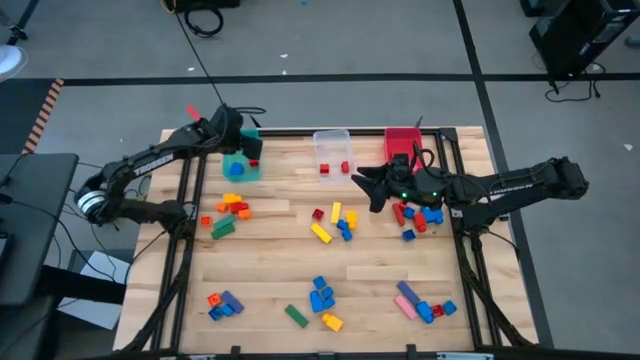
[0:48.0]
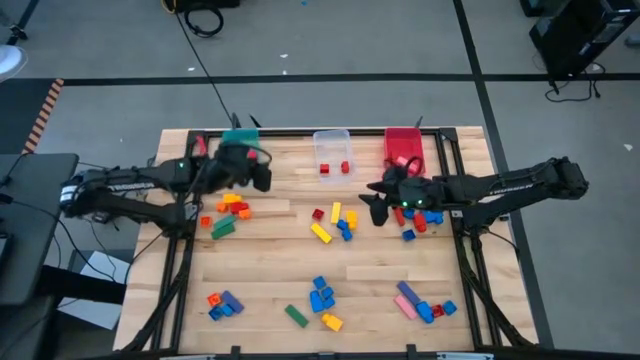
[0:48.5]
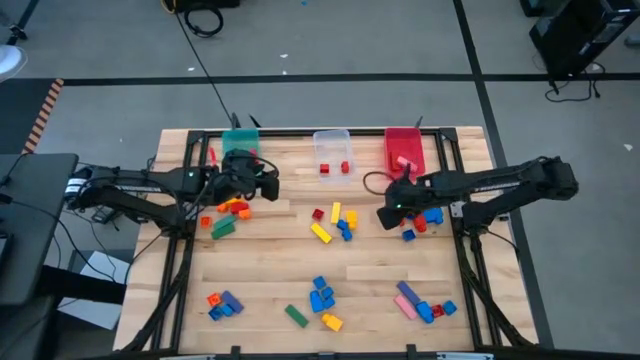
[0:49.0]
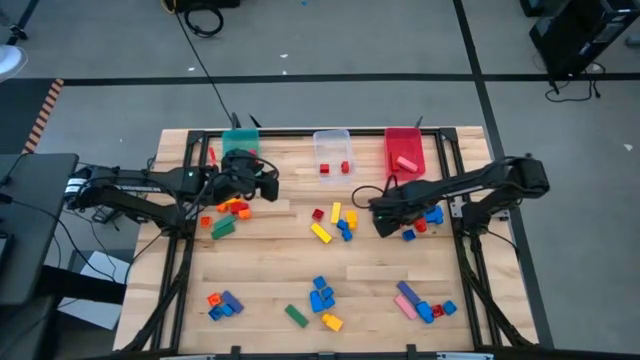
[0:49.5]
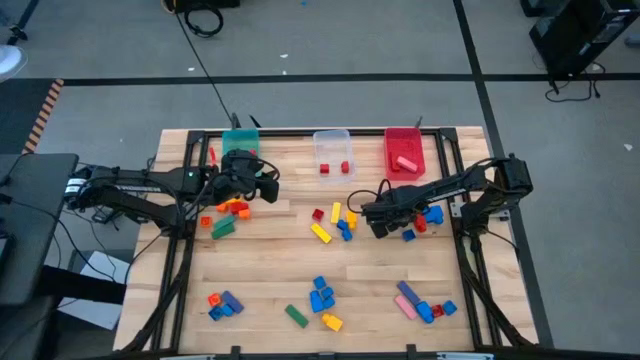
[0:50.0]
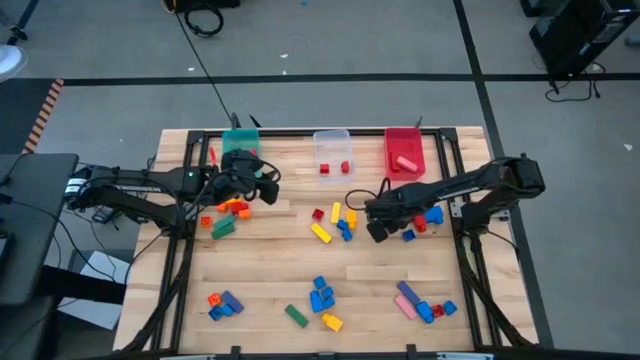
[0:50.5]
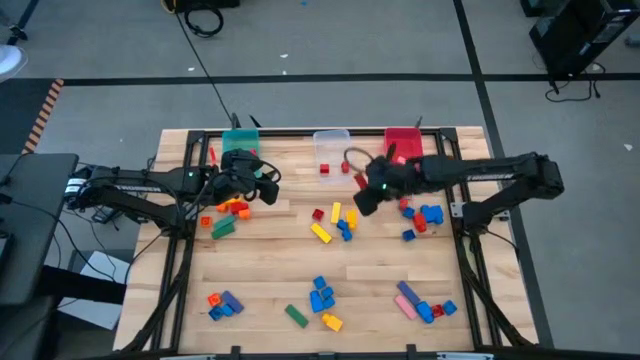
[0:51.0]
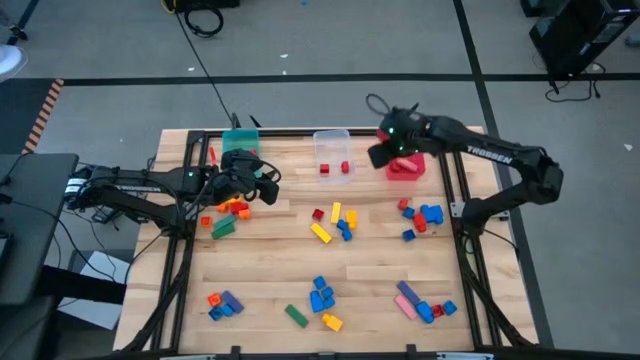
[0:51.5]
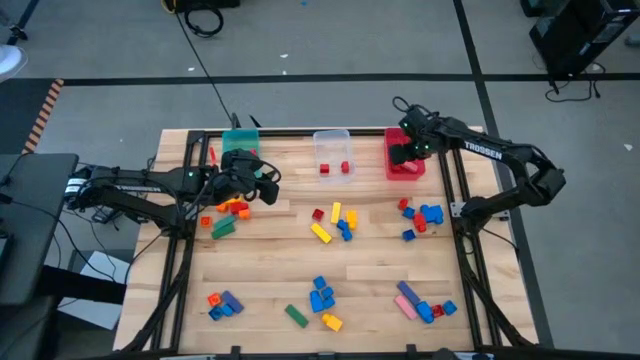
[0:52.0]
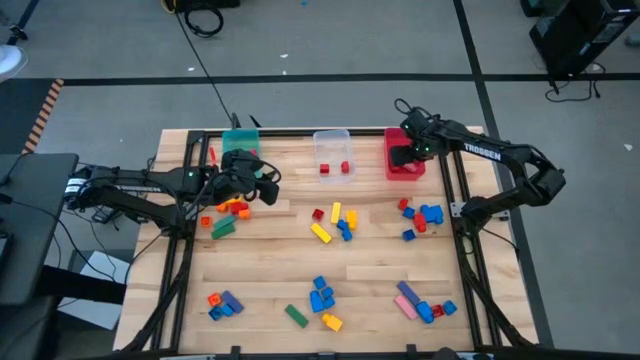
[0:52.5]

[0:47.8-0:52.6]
Task: Sort blocks by size
Put the red block into the red bin

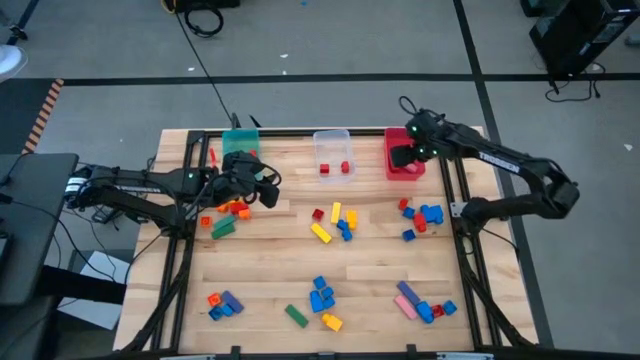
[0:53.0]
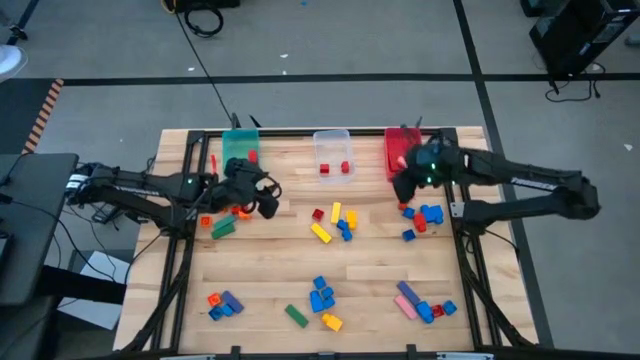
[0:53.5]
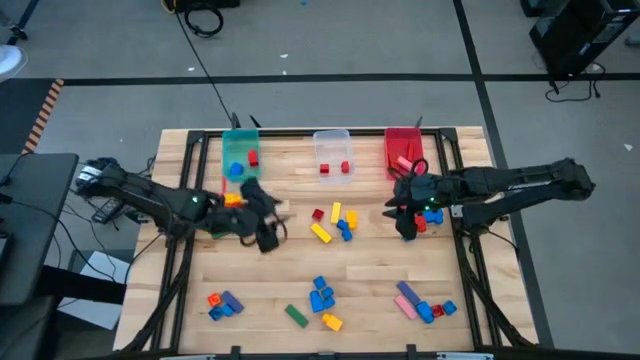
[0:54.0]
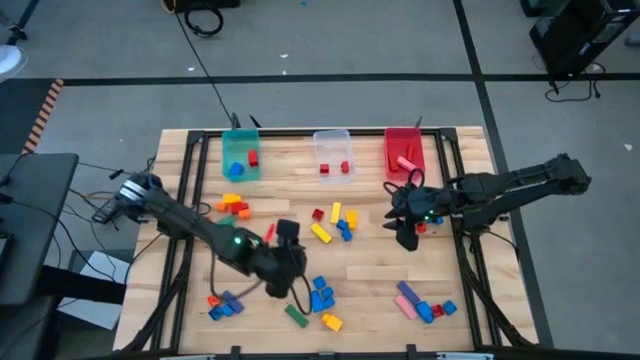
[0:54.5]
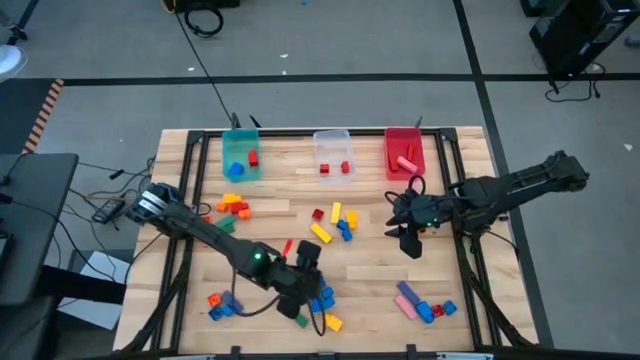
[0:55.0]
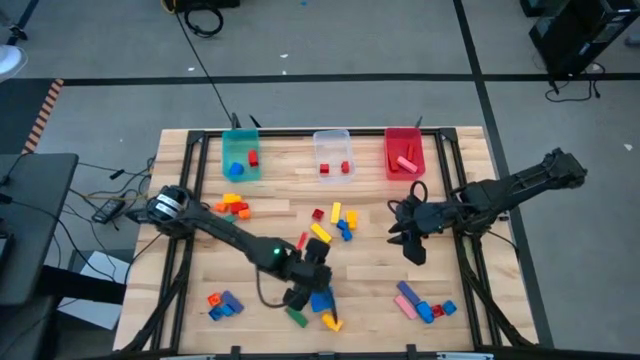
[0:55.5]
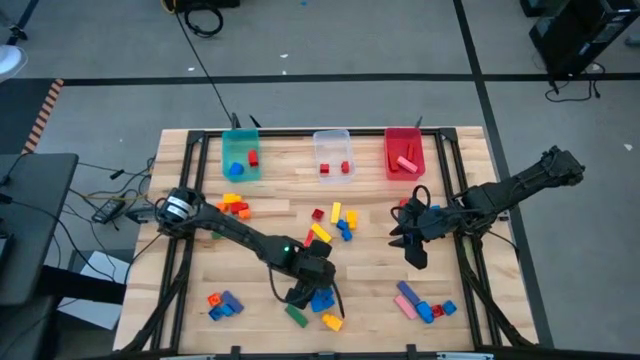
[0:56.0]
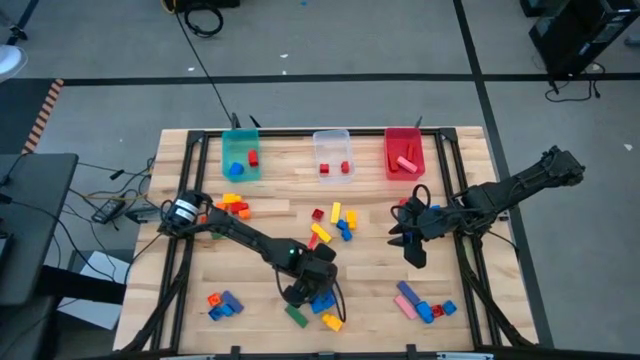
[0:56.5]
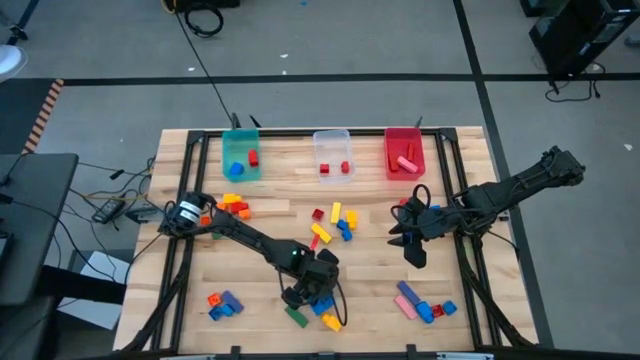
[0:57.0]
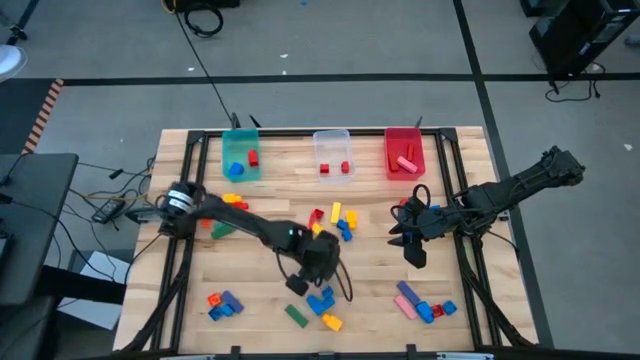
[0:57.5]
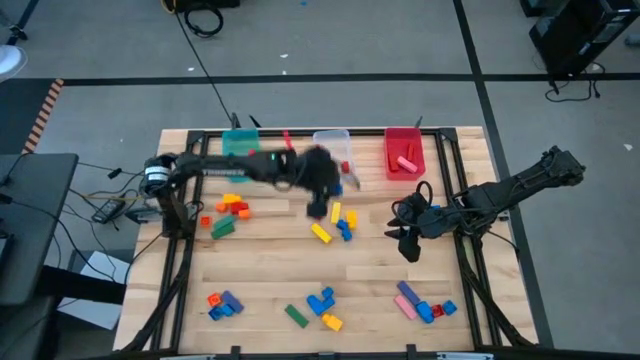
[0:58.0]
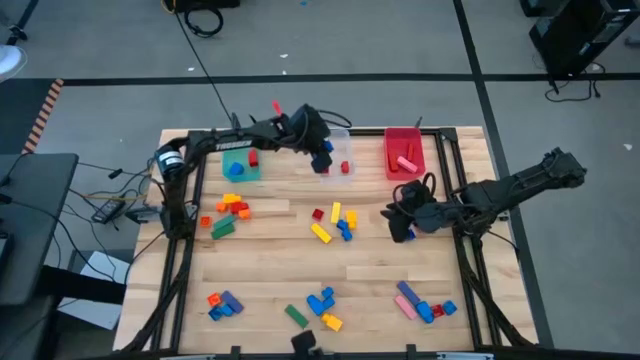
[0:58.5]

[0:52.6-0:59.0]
Put the blue four-stud game piece into the transparent bin

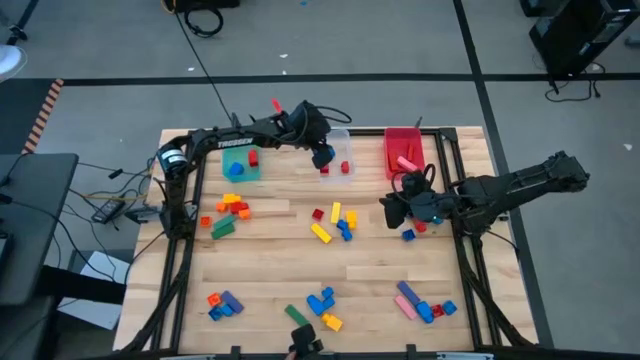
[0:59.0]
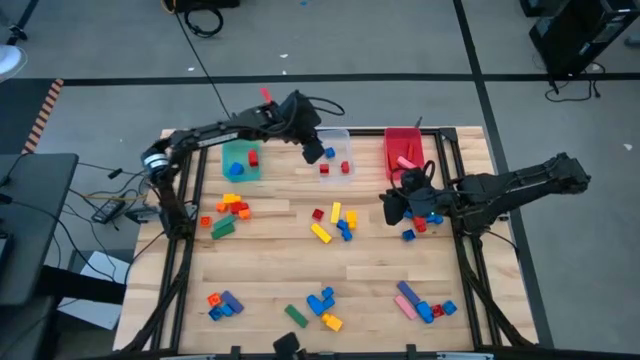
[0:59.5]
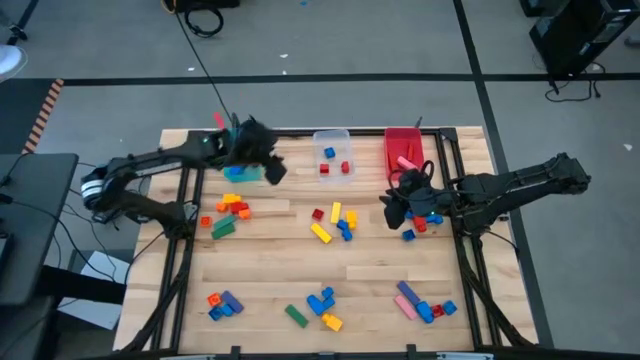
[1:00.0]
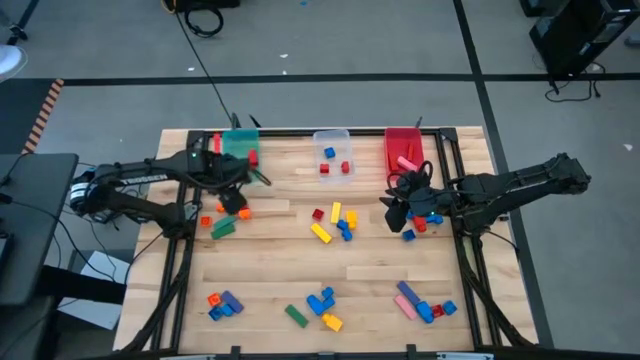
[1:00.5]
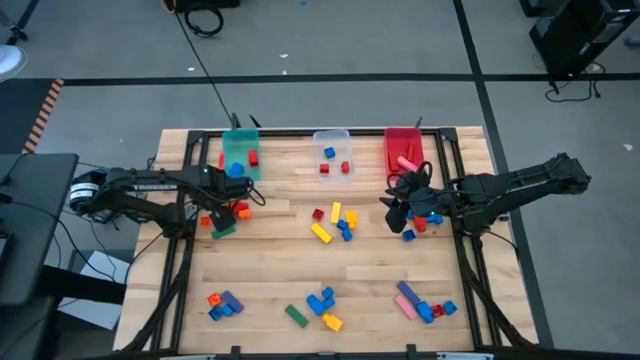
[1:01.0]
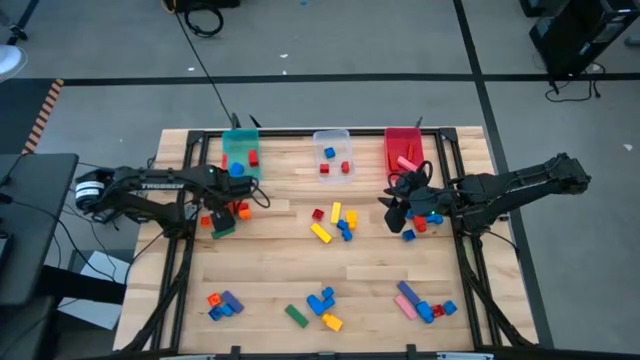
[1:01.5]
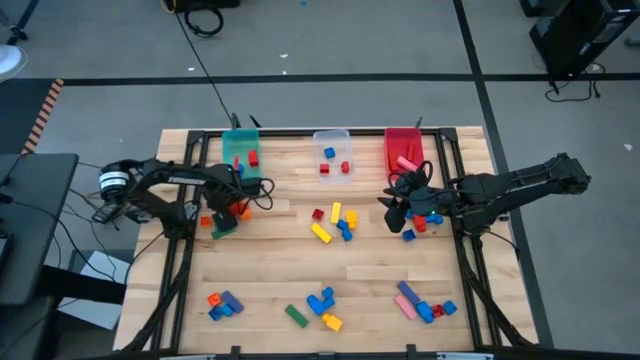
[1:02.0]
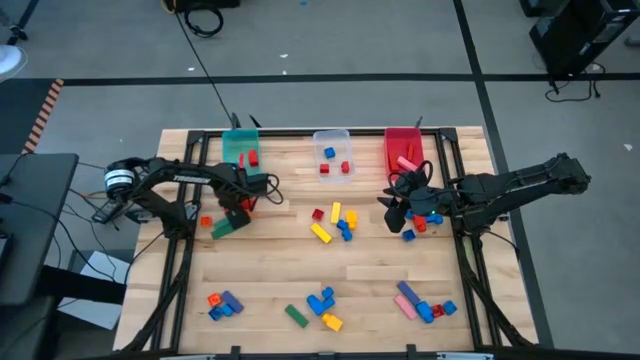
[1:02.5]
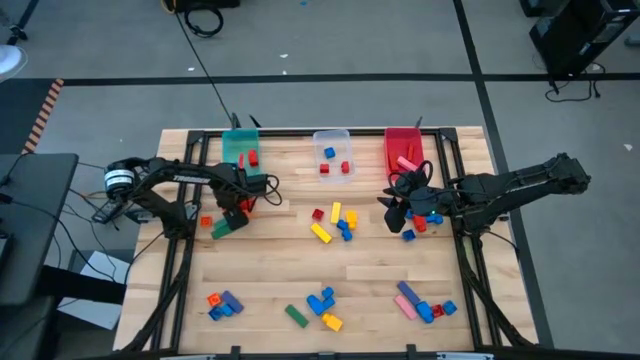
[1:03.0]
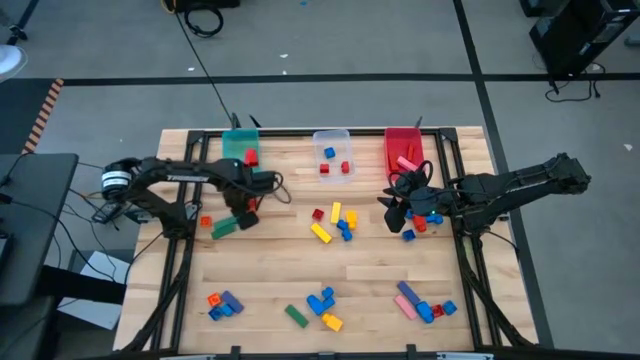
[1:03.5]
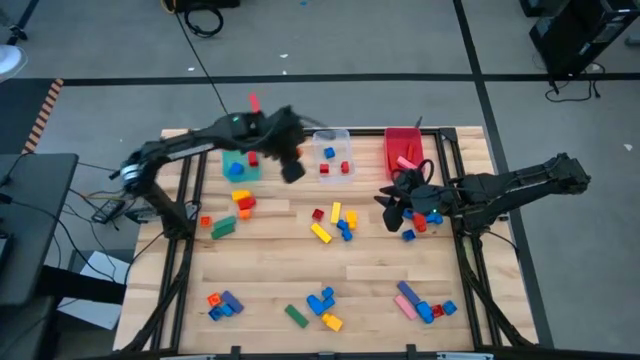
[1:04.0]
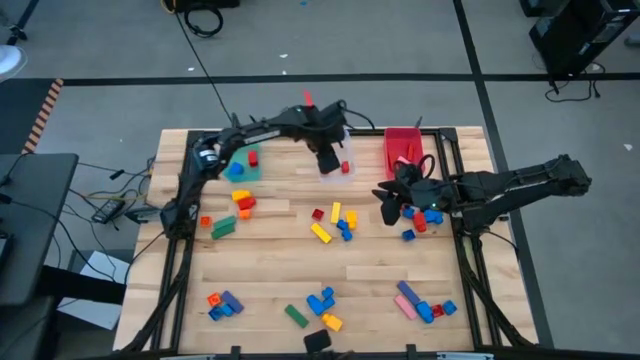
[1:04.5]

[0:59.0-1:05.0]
Put the orange 4 stud game piece into the transparent bin

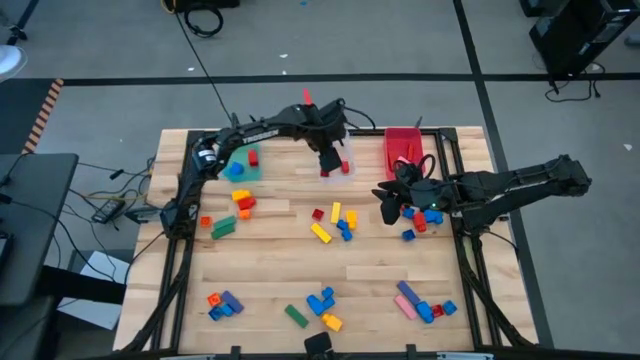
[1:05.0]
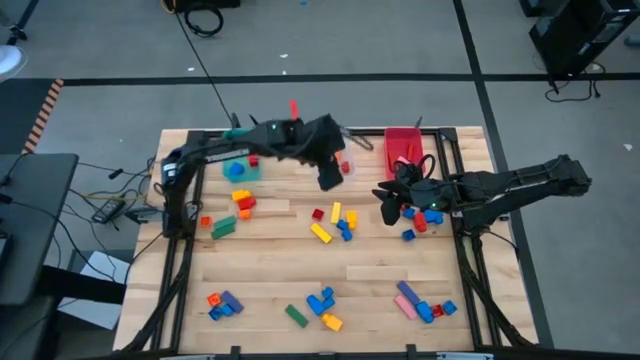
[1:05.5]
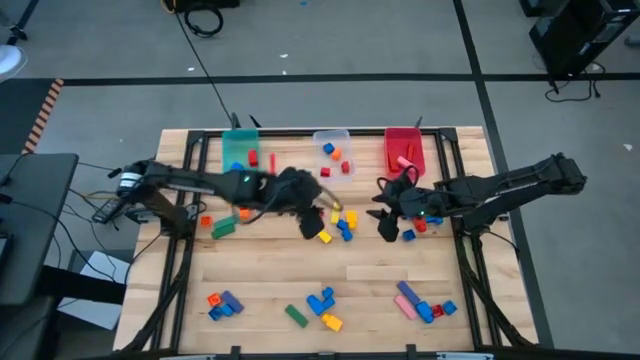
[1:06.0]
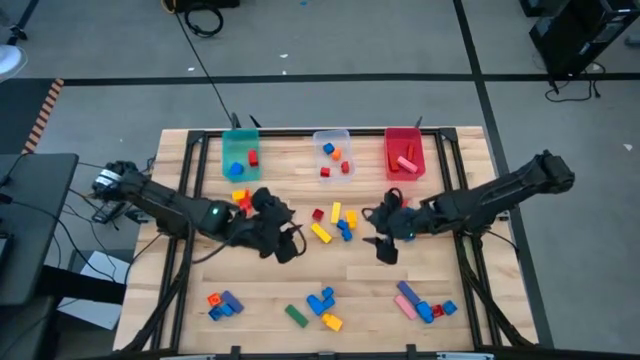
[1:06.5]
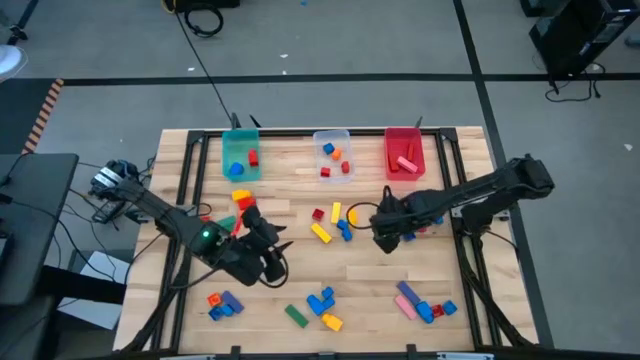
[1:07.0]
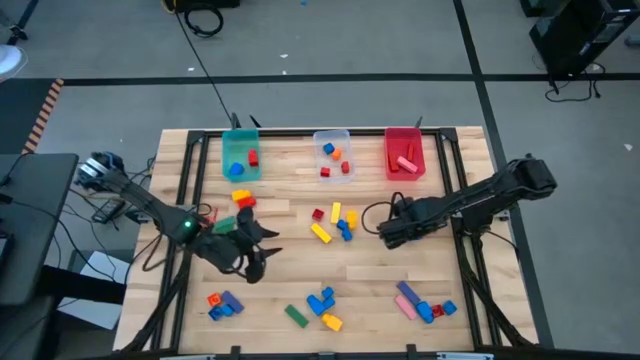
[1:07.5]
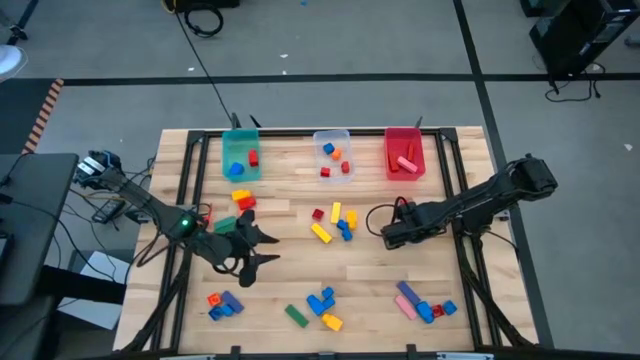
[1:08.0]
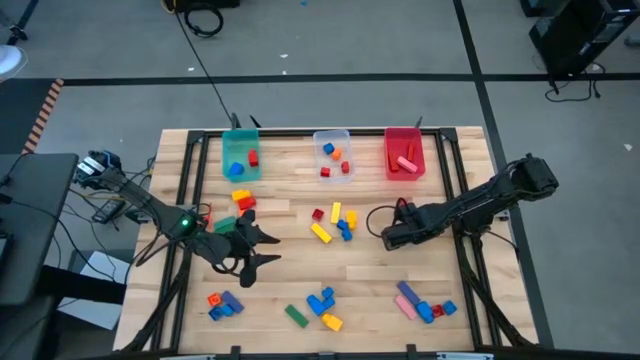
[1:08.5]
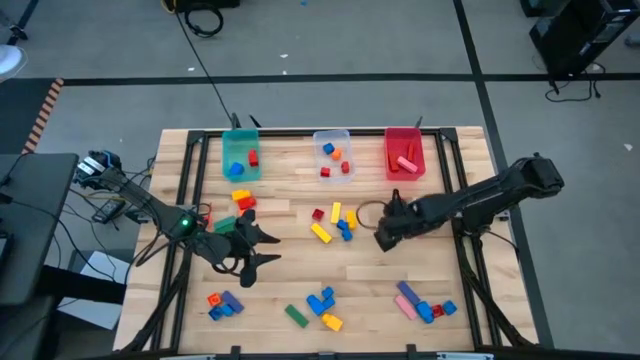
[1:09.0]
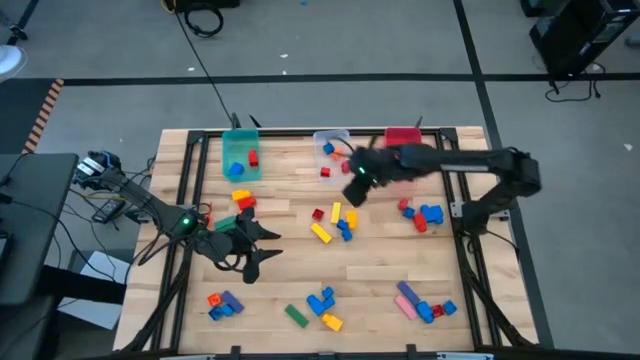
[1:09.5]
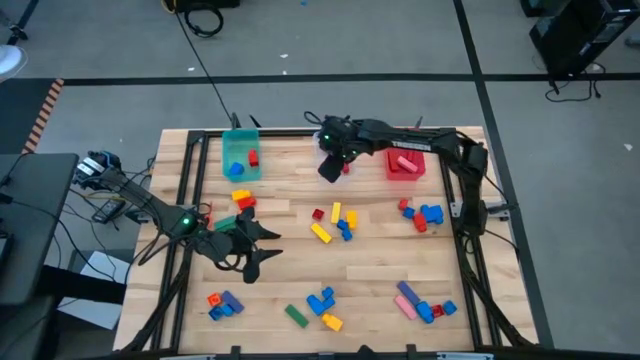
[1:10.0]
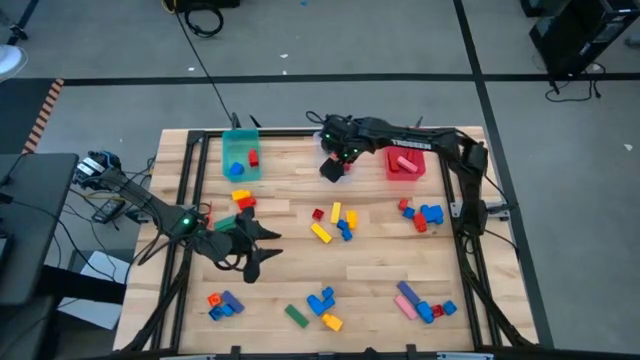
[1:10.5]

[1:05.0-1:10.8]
Put the blue 4 stud game piece into the transparent bin
